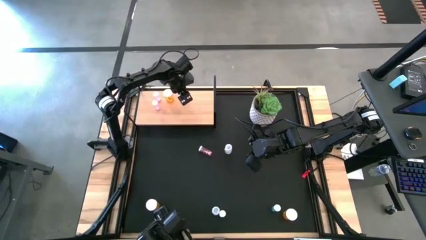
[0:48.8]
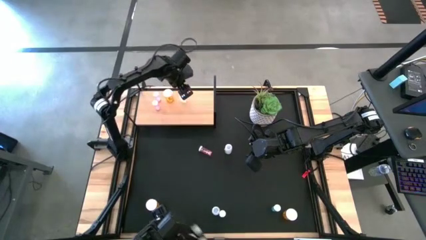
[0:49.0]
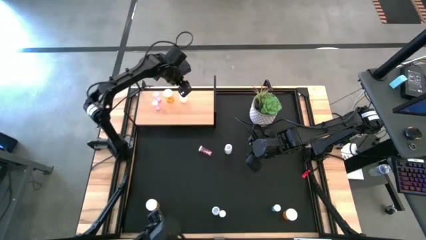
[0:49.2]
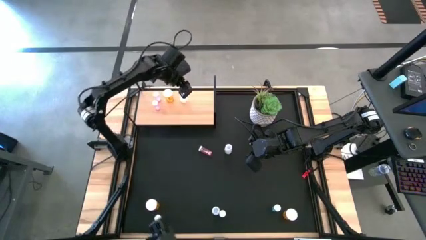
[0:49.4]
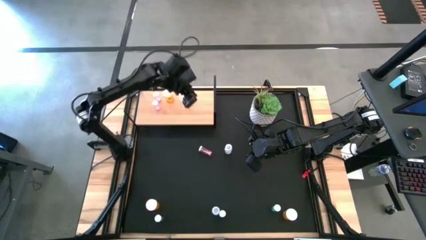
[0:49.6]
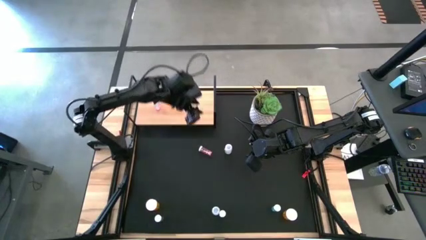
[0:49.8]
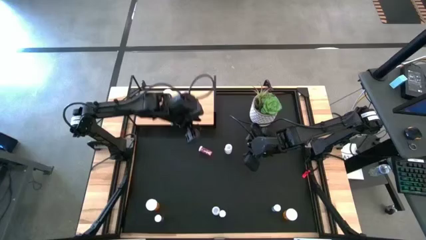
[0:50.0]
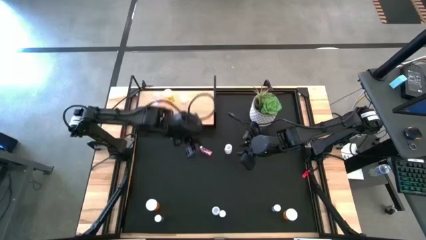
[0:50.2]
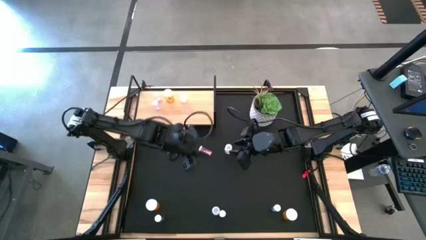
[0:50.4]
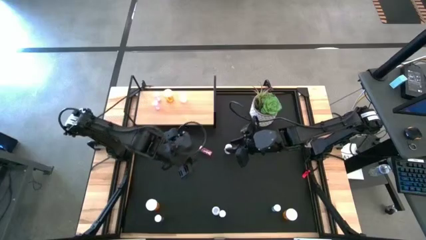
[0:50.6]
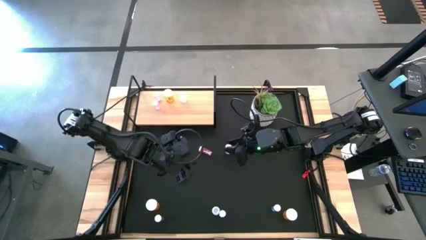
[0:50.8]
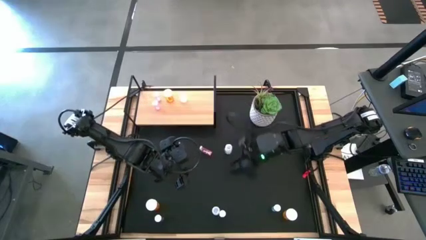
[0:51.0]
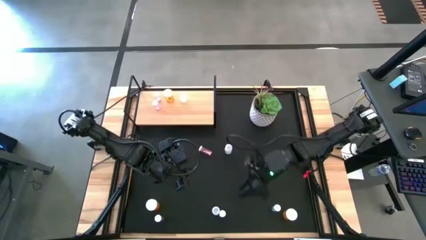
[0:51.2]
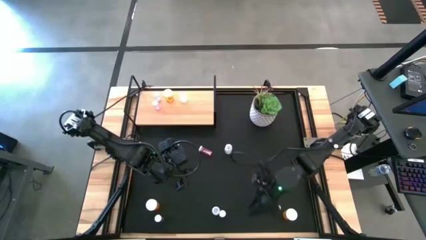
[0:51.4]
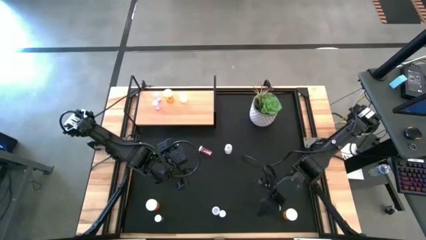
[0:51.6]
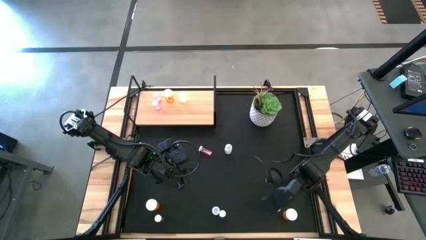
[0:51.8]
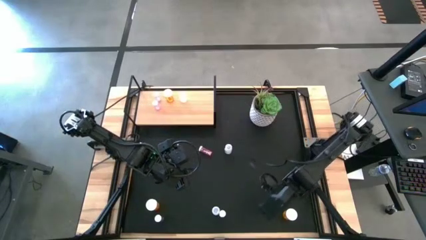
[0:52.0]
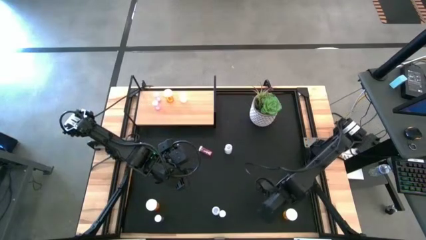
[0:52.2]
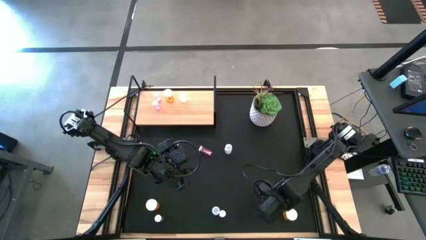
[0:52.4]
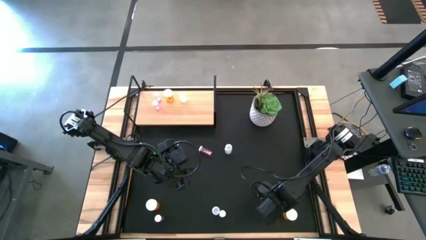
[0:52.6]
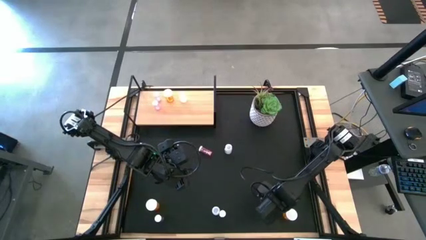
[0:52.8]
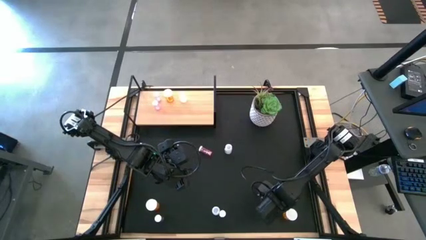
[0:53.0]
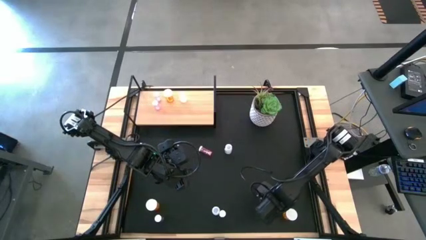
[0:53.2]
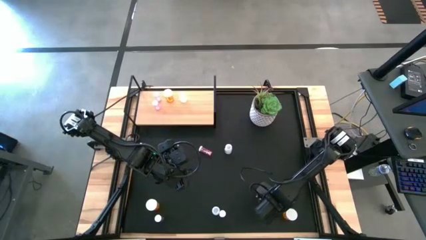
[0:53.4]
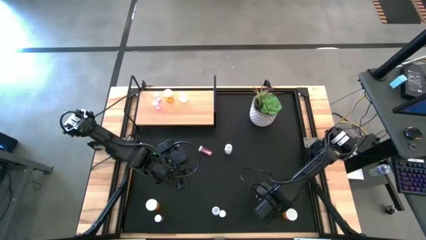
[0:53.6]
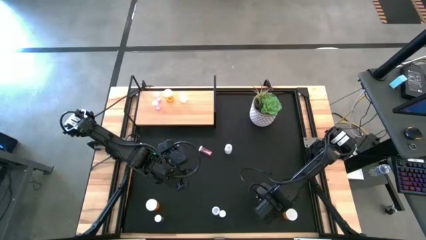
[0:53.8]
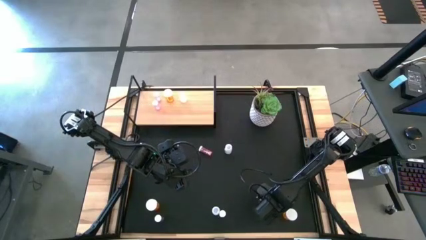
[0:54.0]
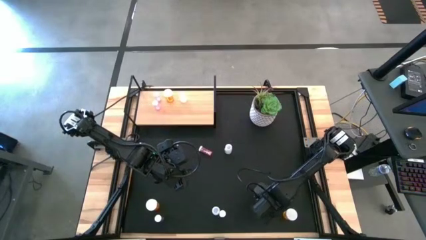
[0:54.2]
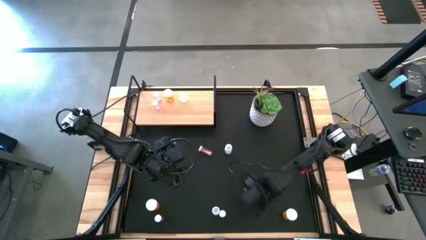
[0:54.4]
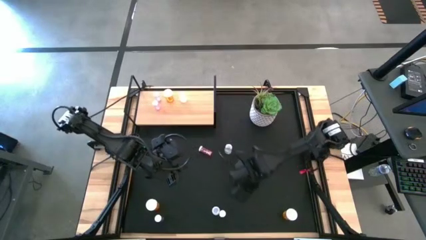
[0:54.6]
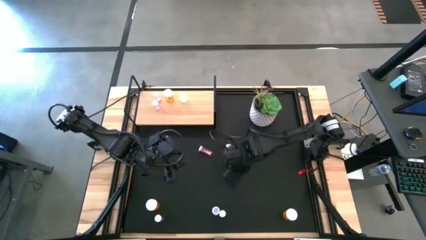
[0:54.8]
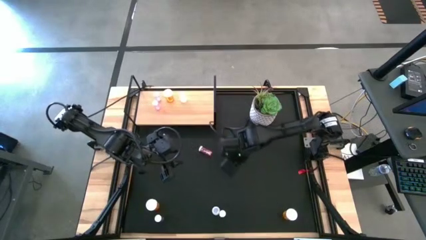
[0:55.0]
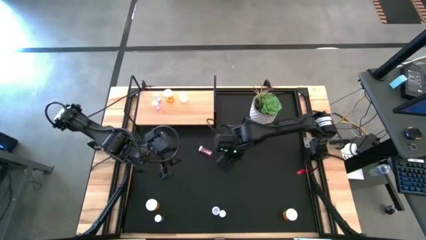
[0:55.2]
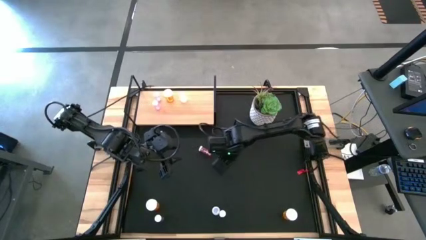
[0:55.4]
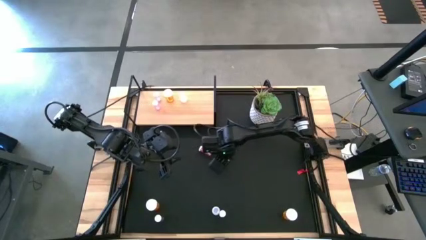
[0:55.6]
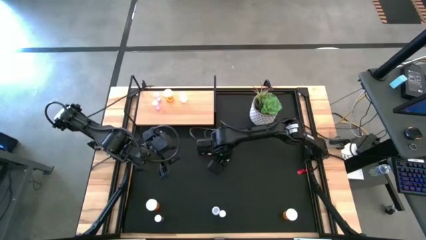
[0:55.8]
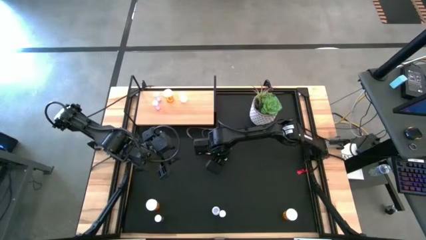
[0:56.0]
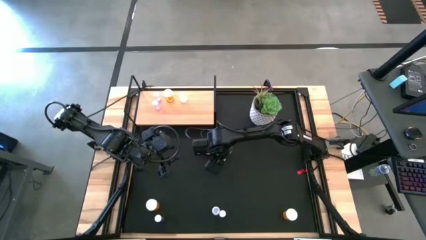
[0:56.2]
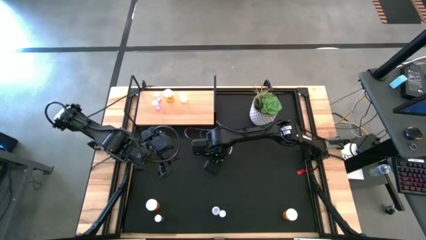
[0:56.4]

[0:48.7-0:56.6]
Task: Pick and place medicine bottles onto shelf by color
Move the bottom right blue pill bottle to the center of the table

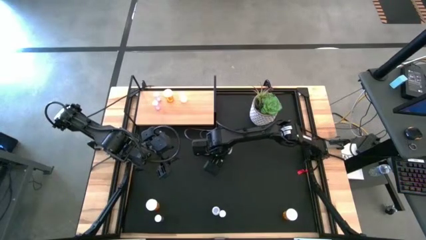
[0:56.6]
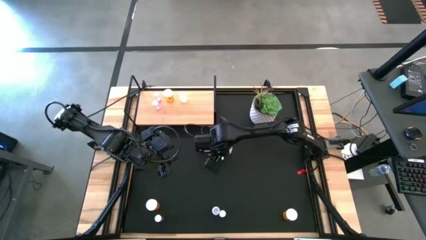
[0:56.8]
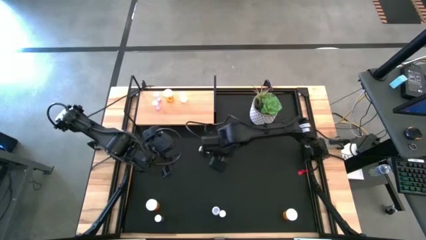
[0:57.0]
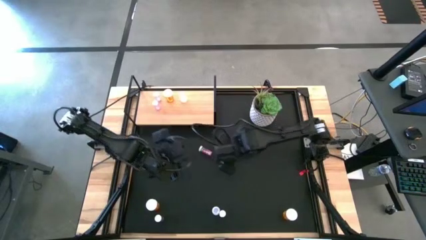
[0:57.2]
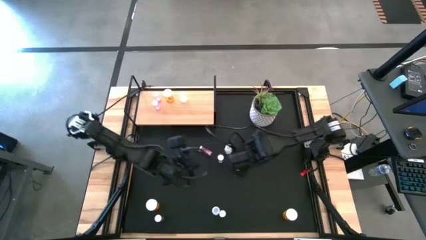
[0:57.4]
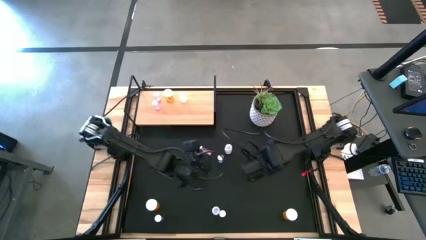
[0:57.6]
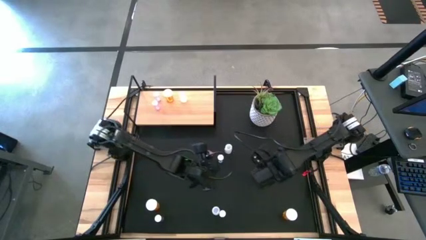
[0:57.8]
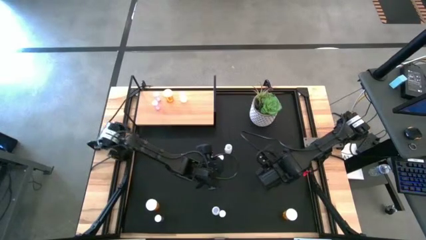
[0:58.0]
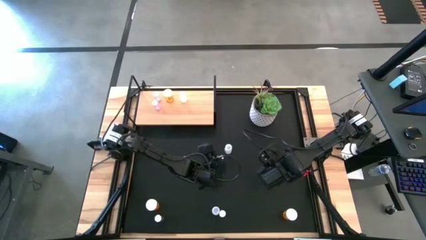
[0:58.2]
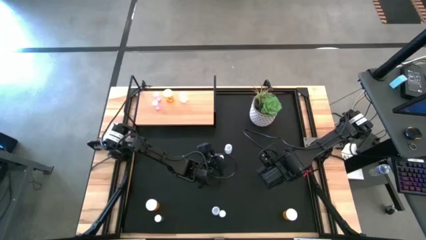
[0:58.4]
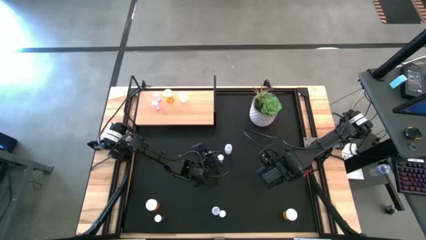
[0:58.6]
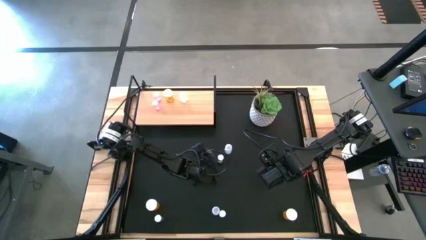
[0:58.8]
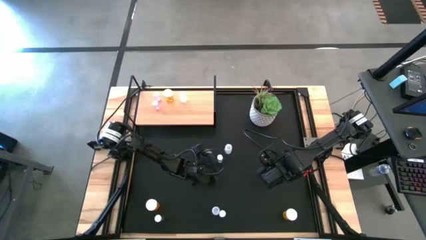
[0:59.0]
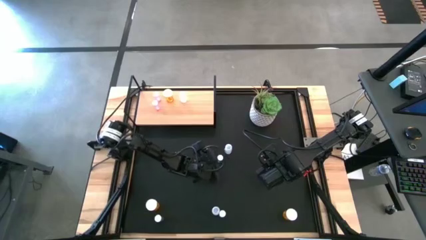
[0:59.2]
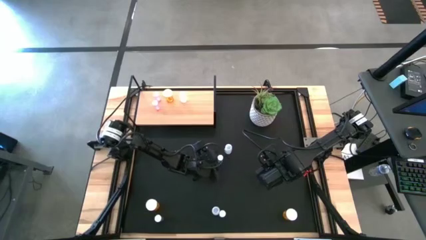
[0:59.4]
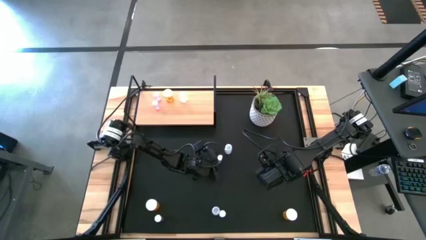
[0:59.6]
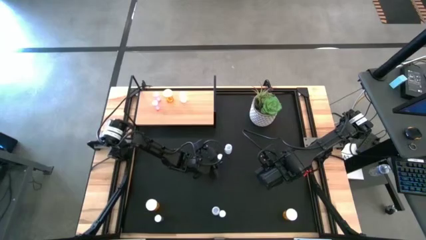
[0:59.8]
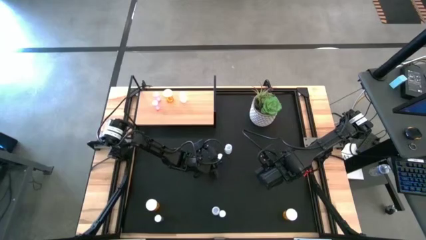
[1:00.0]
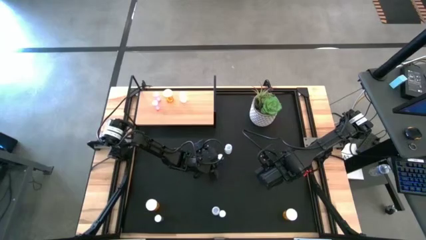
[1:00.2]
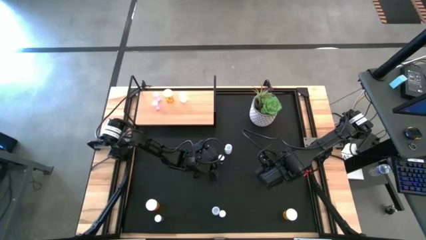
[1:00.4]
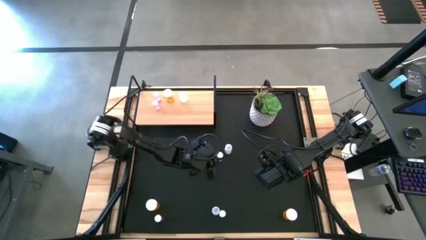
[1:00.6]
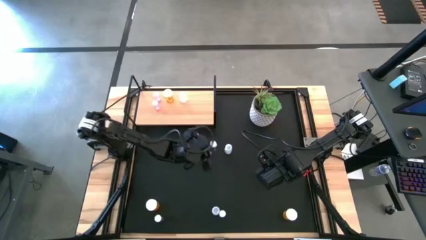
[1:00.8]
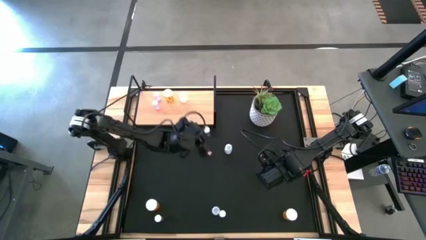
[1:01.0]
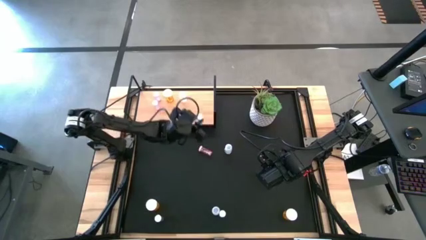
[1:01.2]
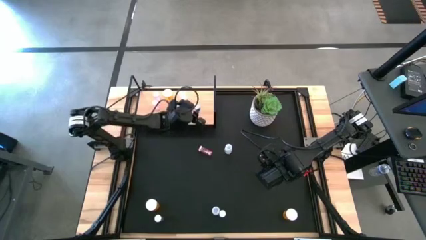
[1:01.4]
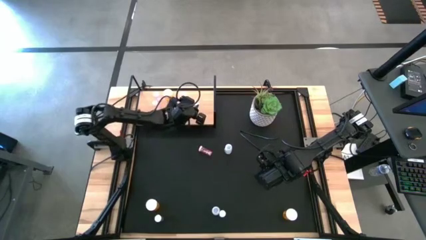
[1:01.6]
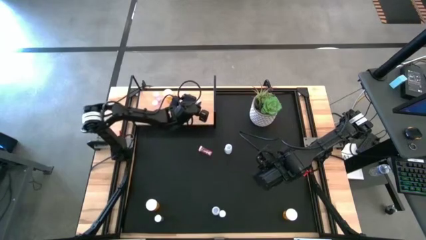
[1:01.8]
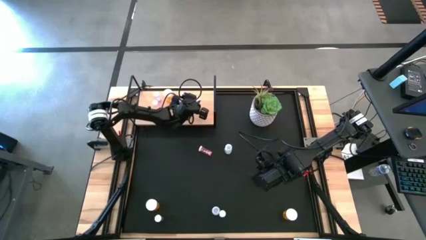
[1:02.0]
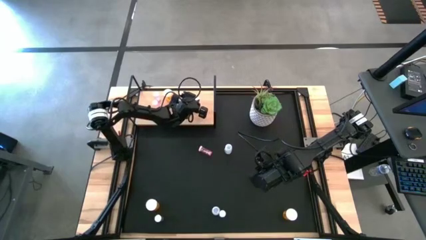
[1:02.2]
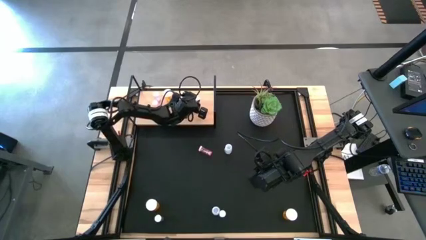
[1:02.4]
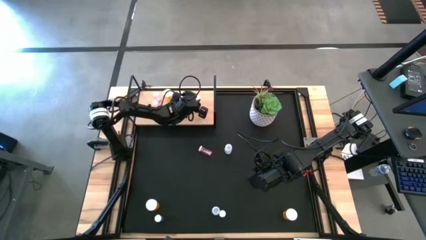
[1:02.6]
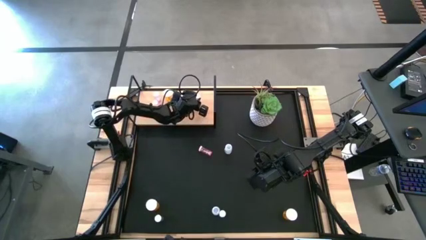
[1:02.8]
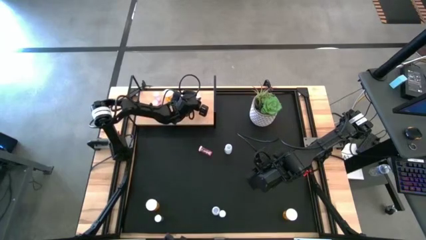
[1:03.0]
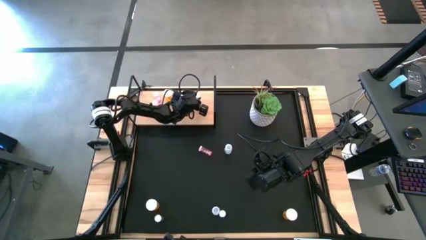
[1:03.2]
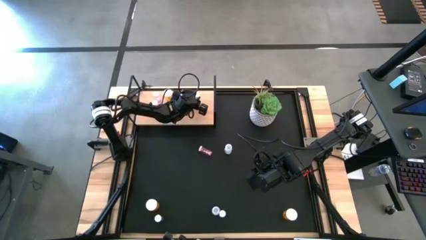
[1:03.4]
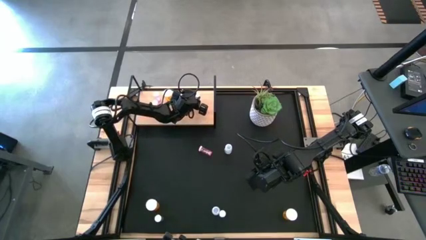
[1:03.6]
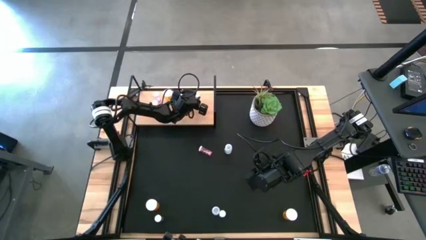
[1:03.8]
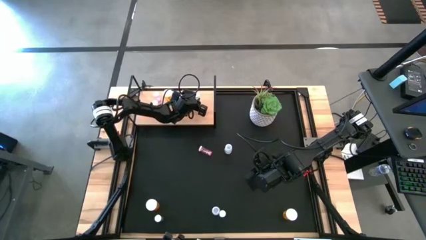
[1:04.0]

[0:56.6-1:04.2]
Put the center blue pill bottle on the shelf

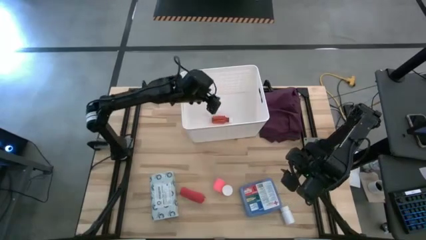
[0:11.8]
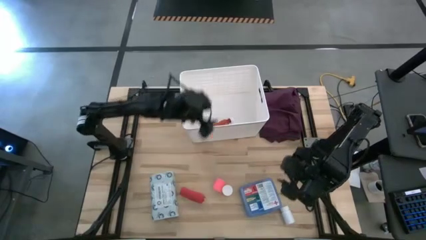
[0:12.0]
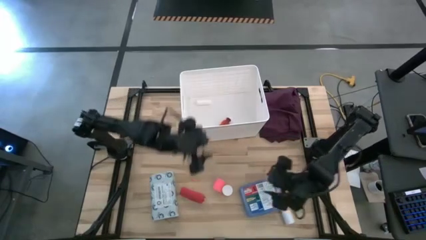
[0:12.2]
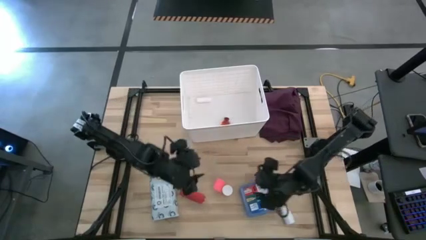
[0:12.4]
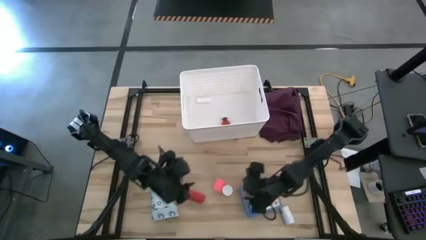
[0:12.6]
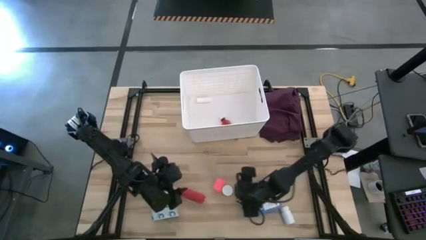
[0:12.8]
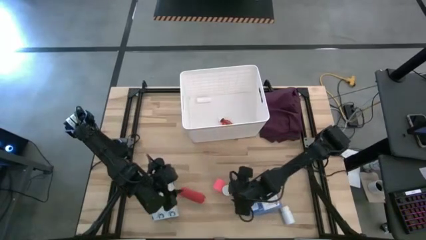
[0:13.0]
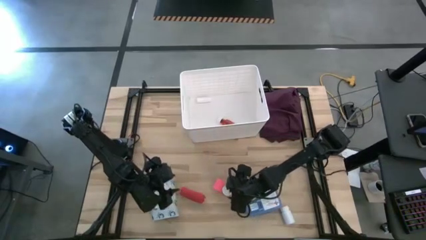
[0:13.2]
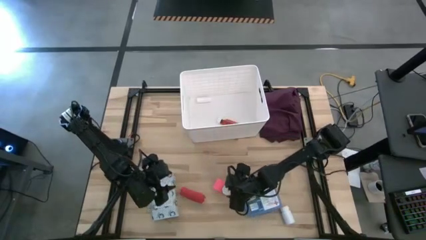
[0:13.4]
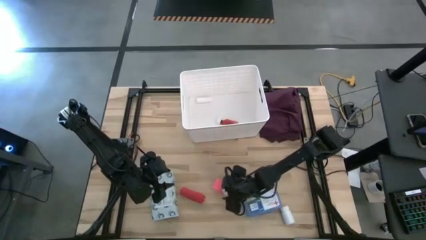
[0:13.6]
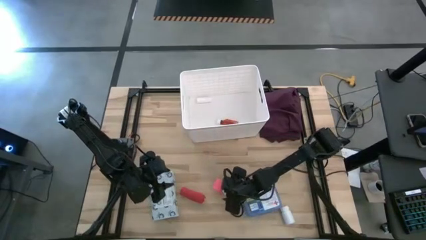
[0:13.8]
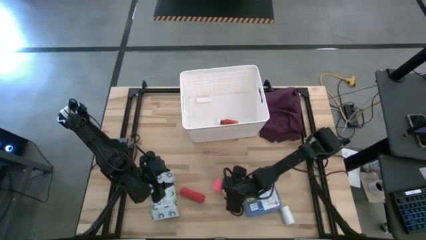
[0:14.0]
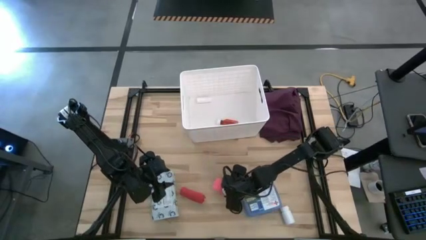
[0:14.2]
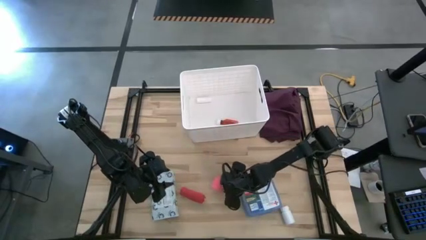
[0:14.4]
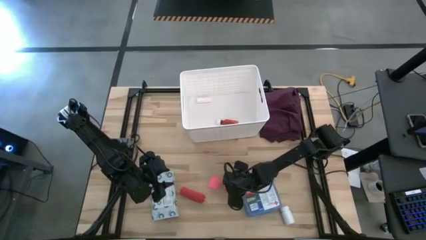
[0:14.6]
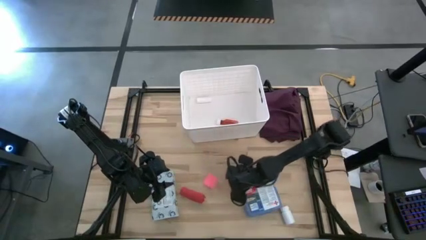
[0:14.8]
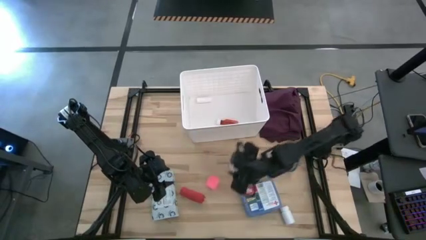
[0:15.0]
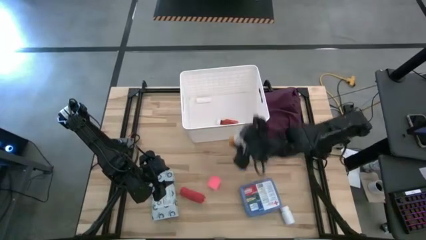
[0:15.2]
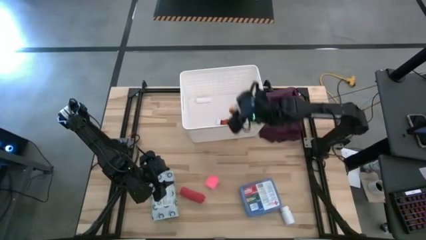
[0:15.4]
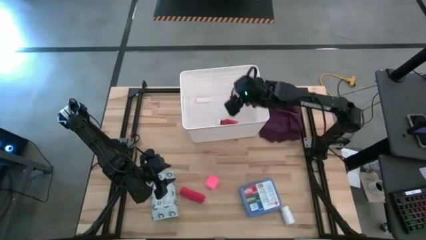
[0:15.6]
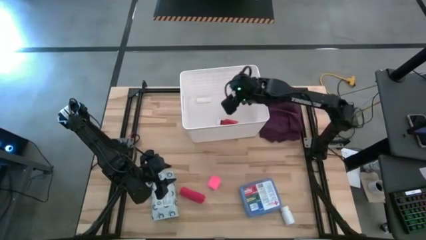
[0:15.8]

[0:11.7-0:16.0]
Task: Pick & place medical supplies in basket/bin
Put the orange pill bottle into the white bin
